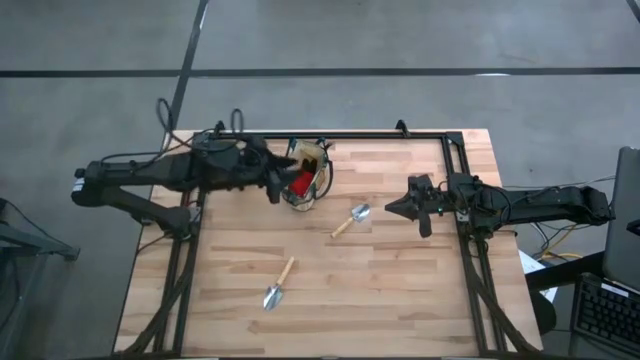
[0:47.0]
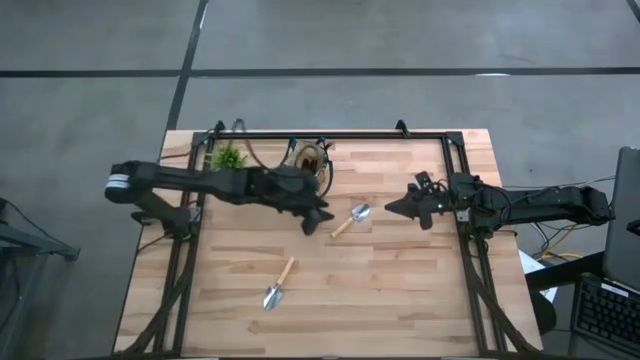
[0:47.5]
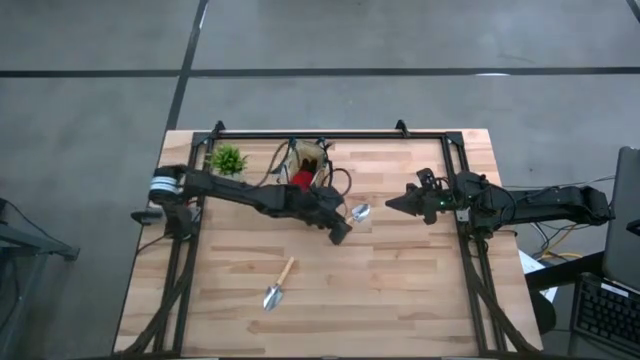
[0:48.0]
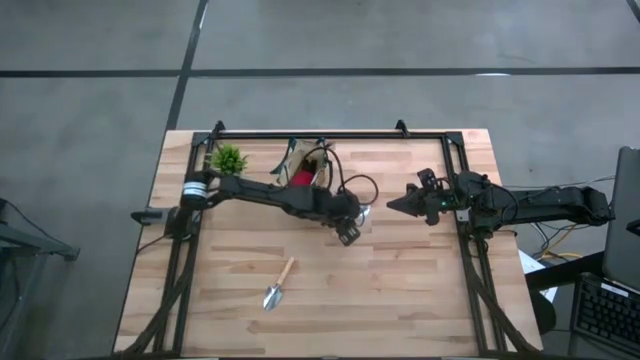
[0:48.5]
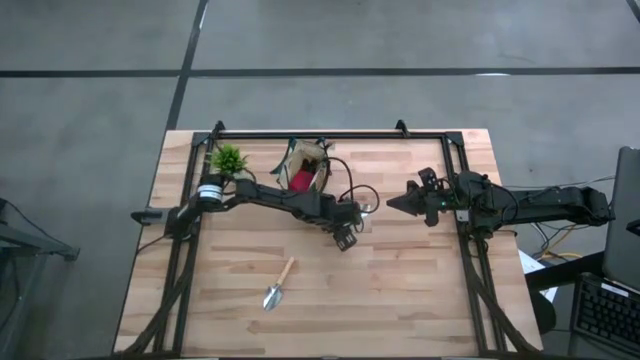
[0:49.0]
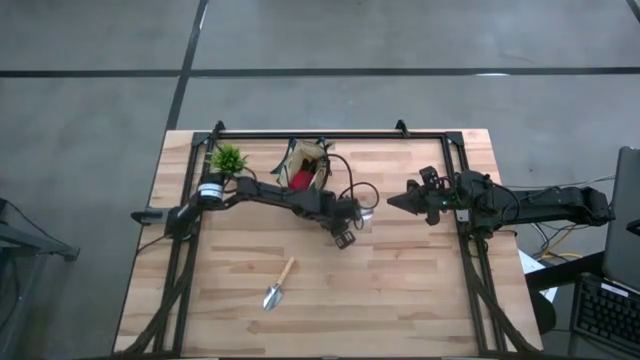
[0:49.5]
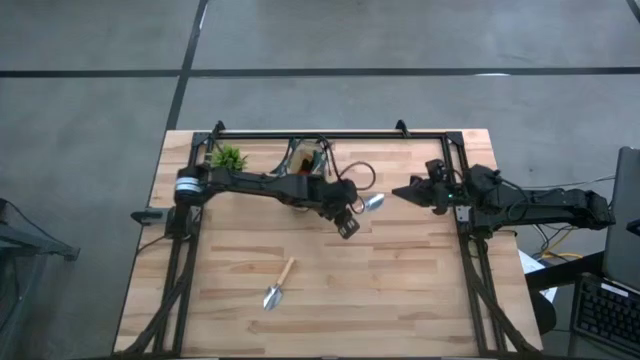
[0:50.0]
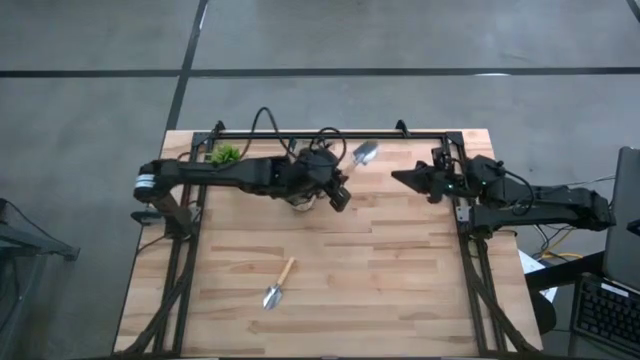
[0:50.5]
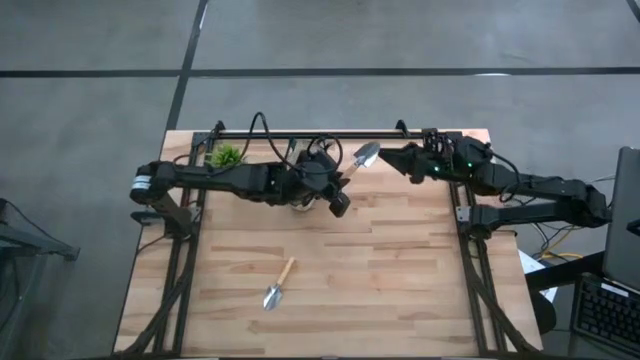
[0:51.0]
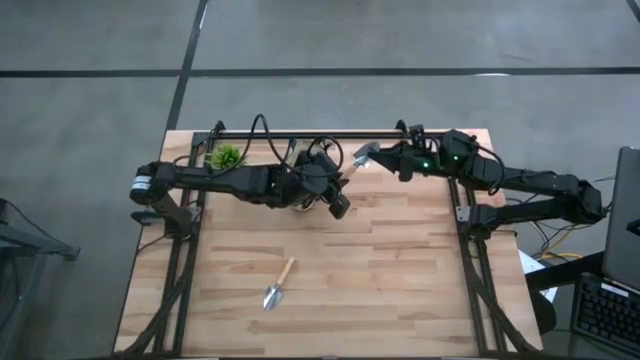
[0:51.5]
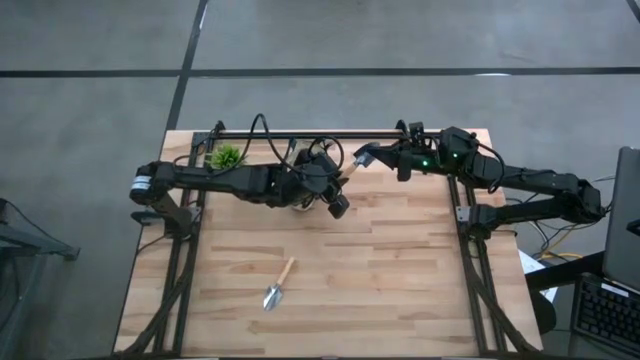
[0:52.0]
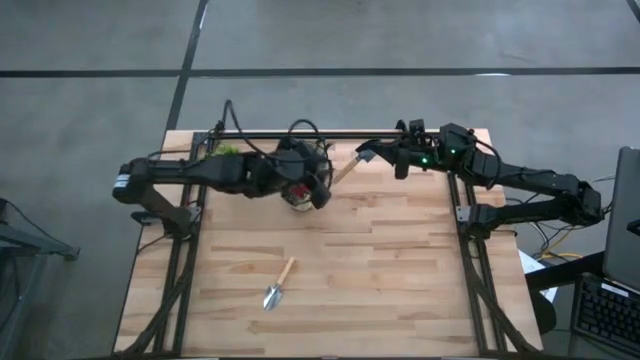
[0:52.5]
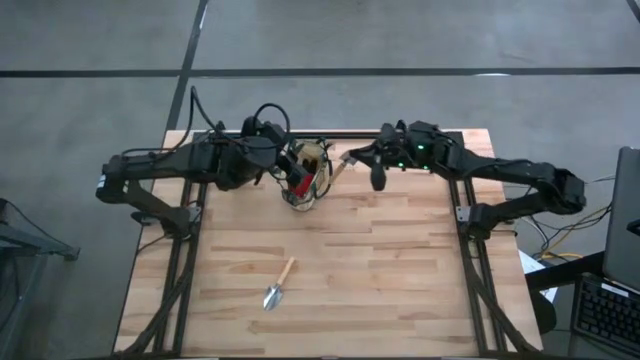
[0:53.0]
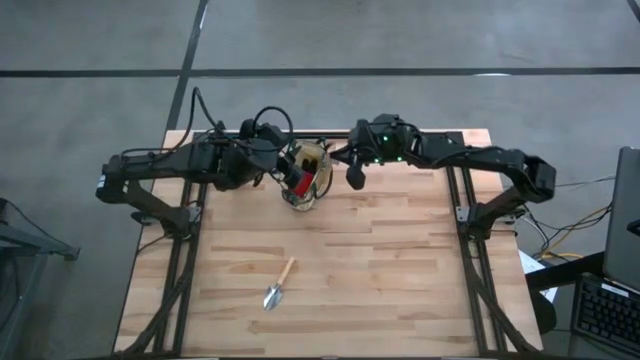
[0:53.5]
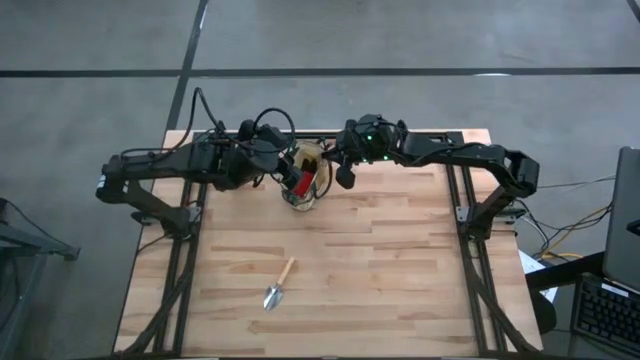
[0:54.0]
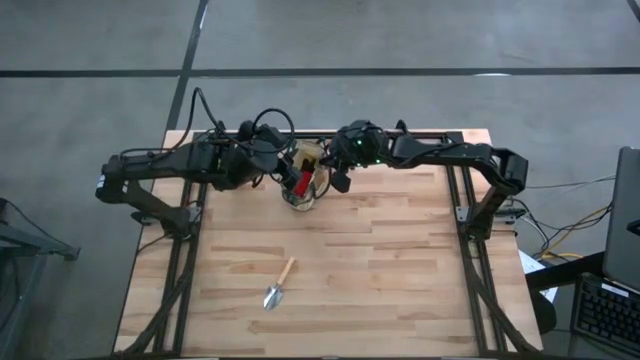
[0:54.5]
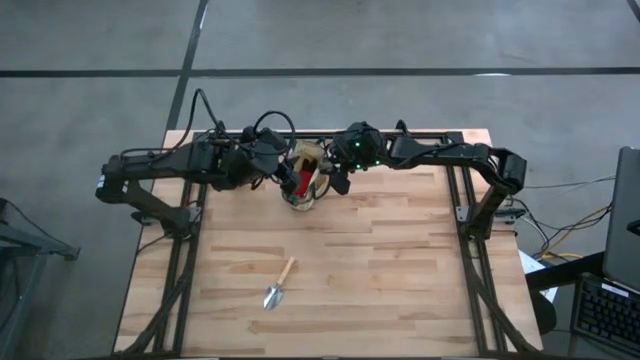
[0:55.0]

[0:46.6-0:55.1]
Task: Pick & Place Garden tools in Gardening bag
Put the top brown trowel into the green gardening bag

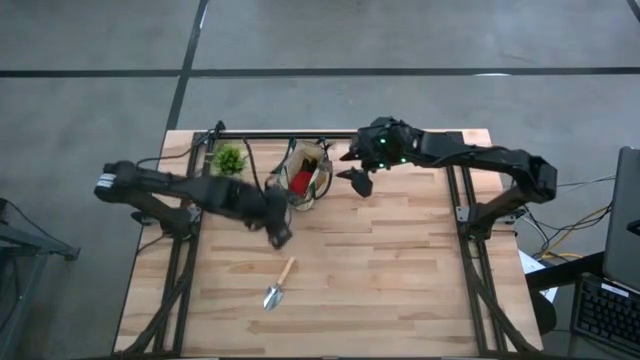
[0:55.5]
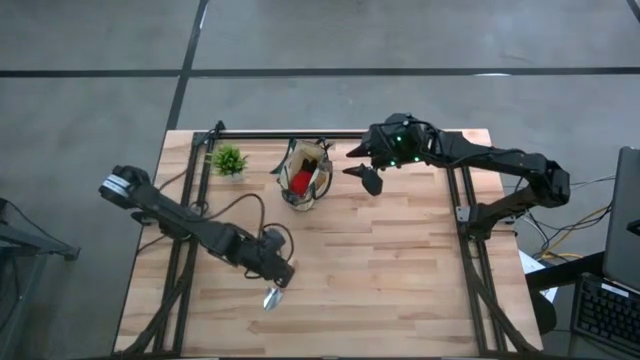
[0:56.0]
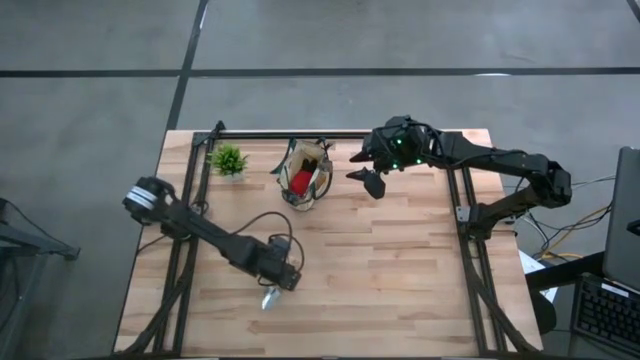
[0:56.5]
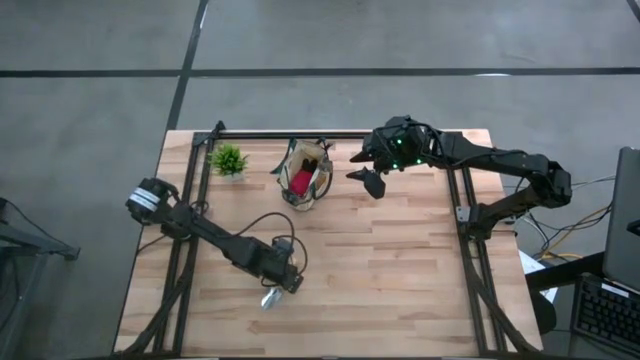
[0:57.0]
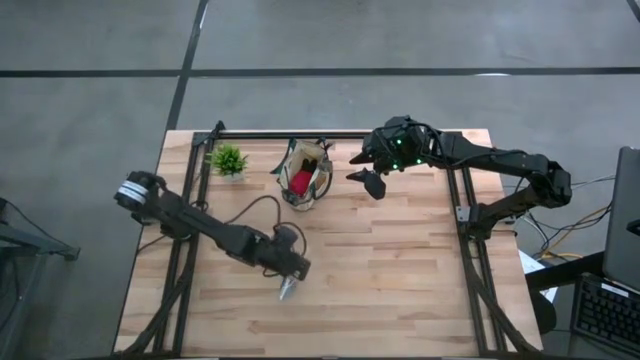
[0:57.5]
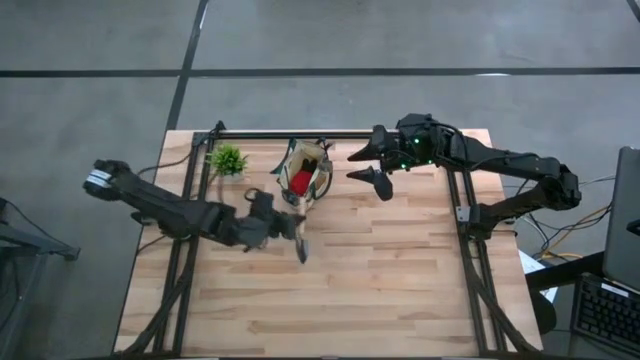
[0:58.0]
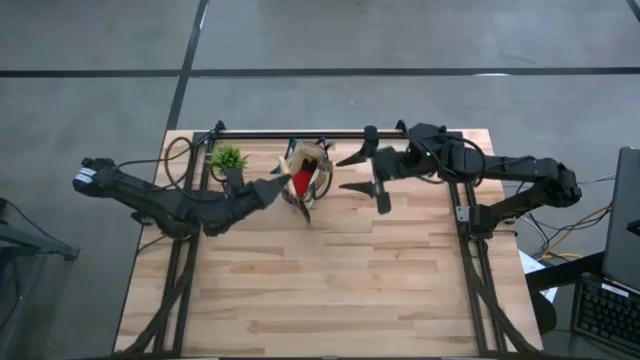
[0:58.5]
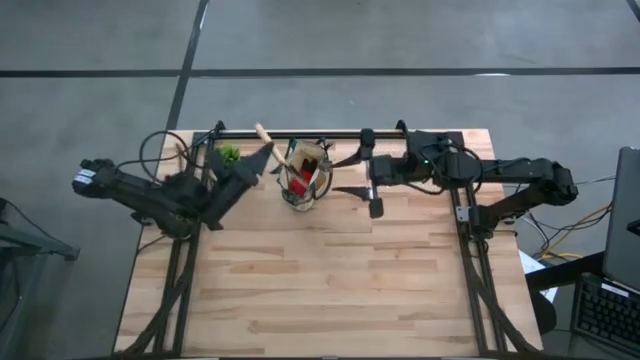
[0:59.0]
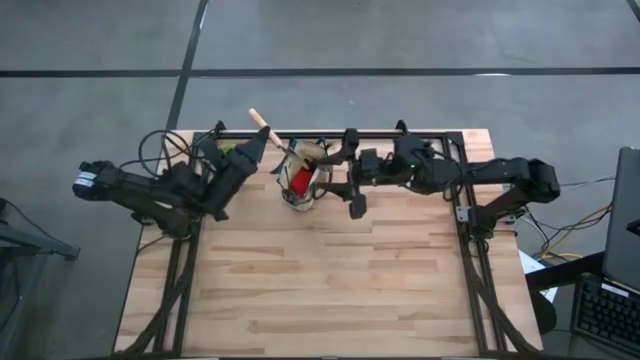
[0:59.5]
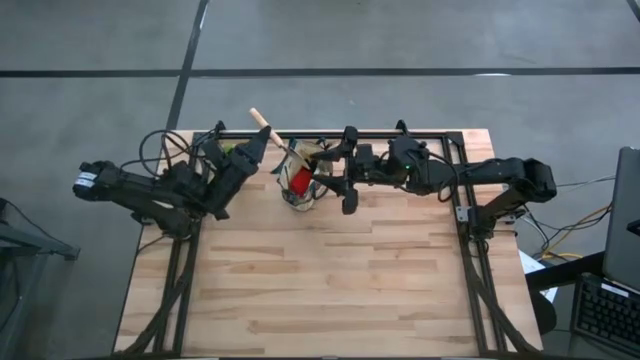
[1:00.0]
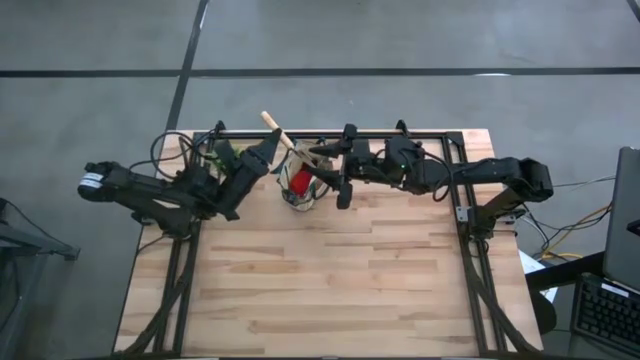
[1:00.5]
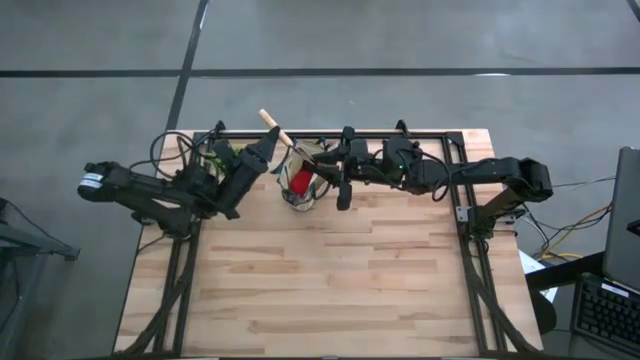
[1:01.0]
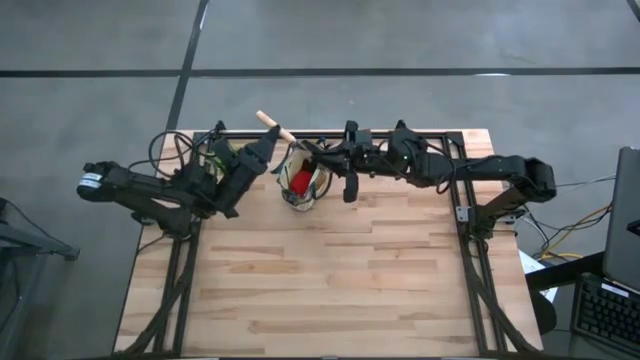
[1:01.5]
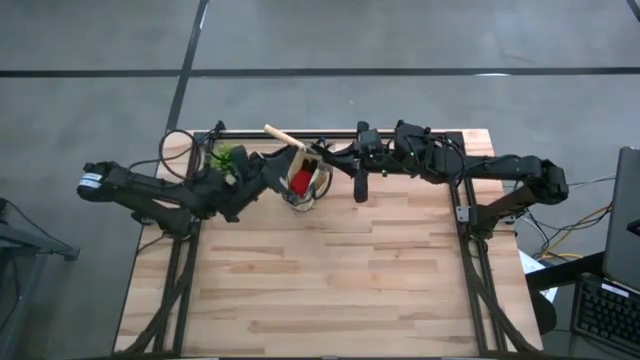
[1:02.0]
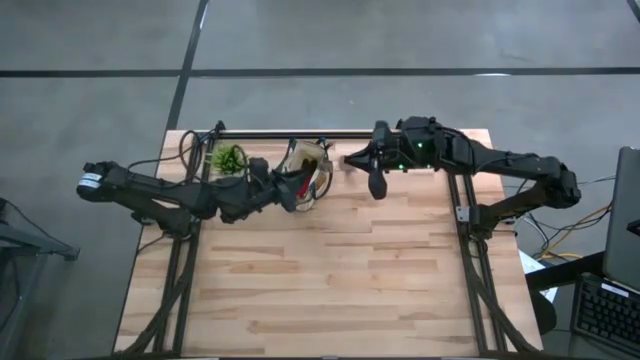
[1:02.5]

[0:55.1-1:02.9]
Put the brown trowel into the green gardening bag

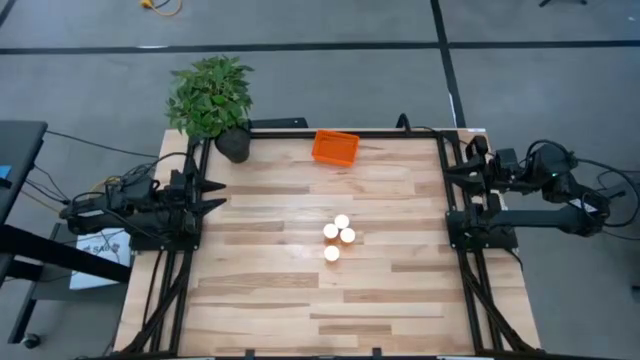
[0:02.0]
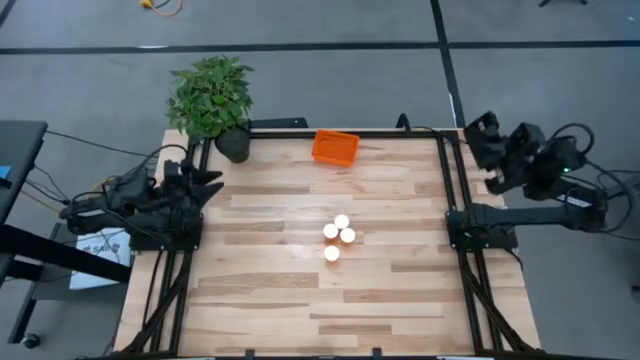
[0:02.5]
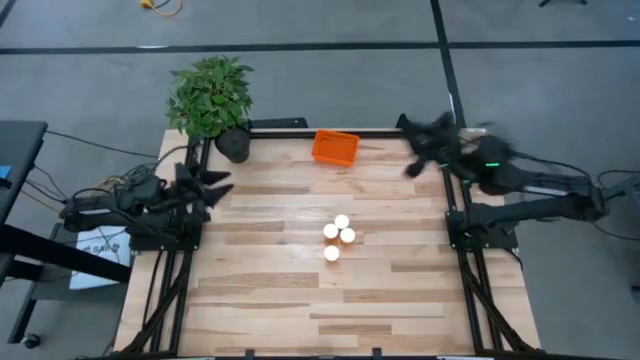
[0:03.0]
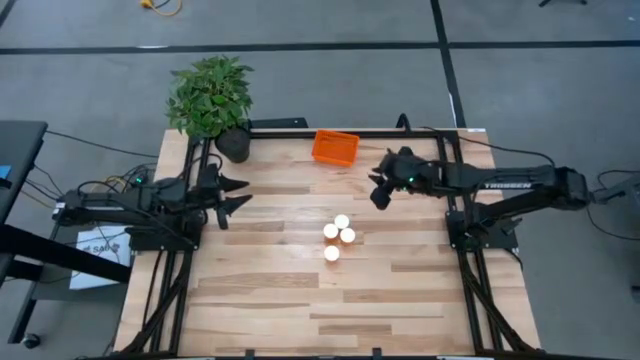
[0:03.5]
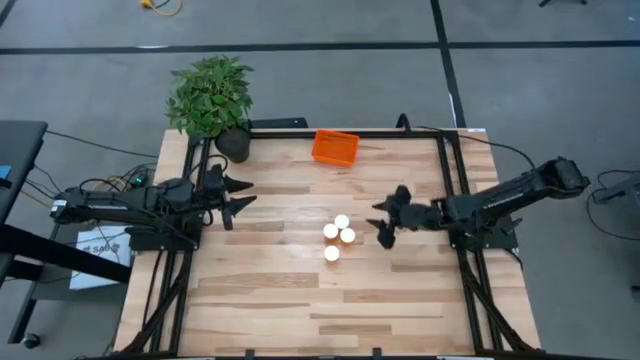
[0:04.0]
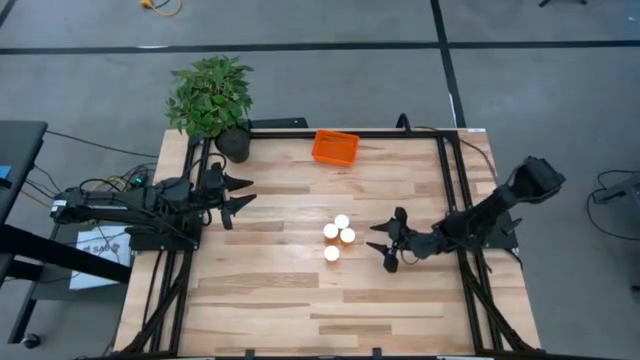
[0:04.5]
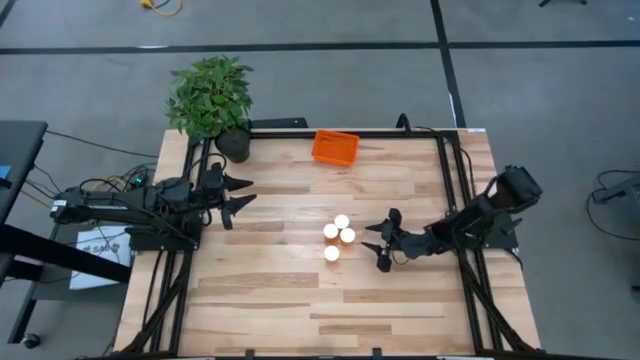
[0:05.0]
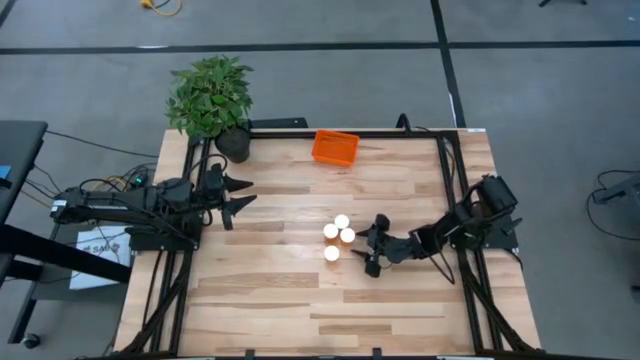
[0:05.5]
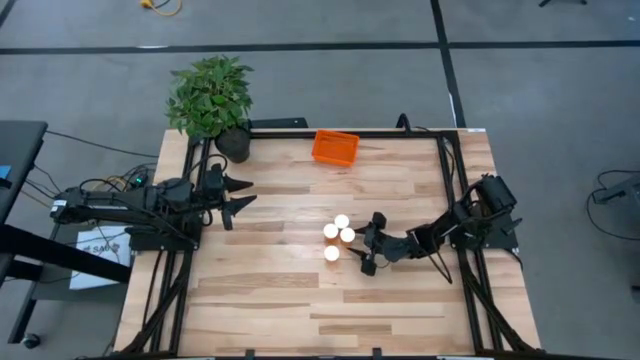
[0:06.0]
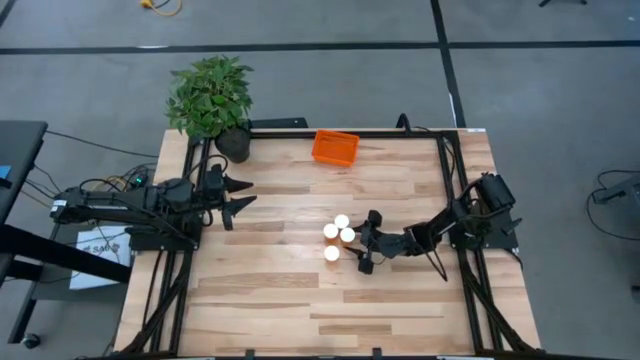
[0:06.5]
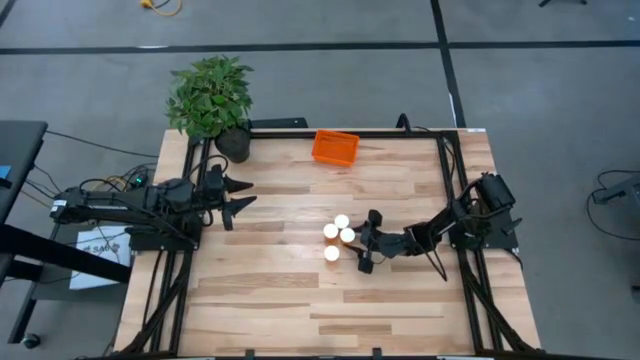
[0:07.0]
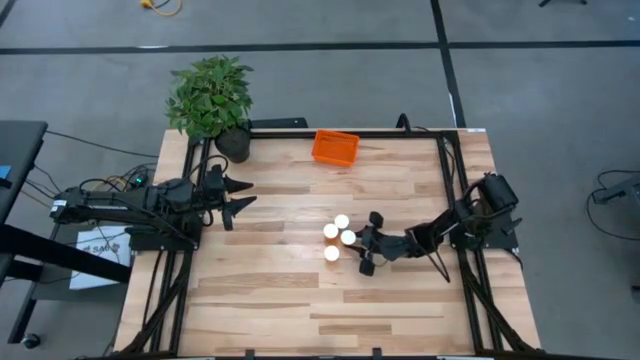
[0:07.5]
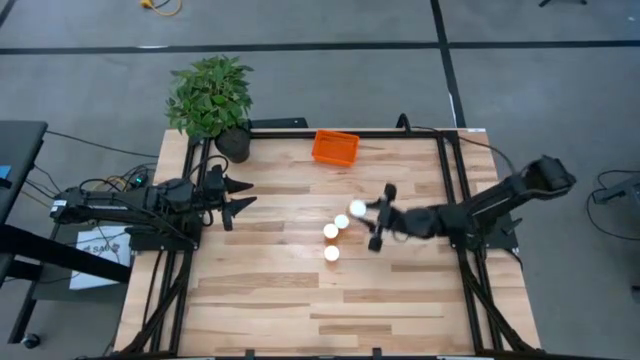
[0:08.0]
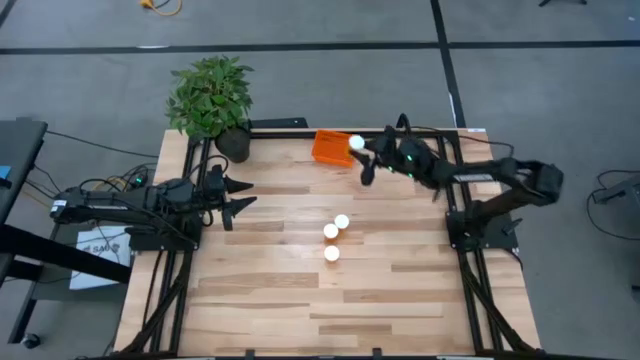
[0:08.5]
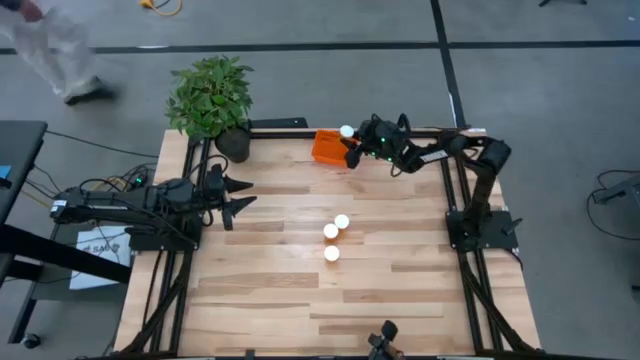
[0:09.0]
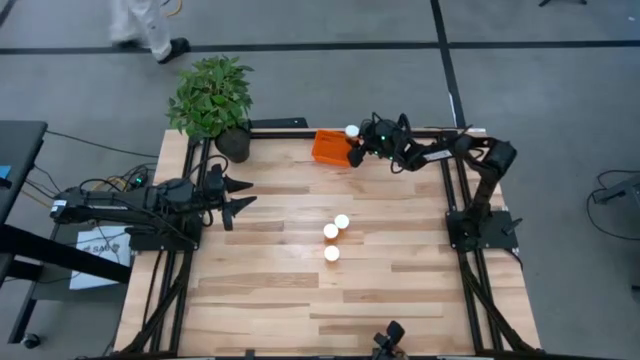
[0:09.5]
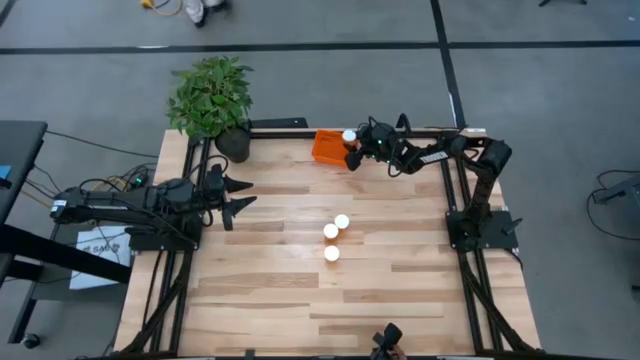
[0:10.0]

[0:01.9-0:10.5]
Task: Pick and place pill bottles into a basket
Put the orange medicine bottle into the orange bin
